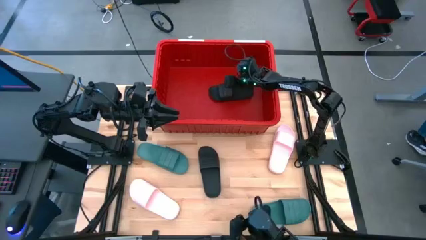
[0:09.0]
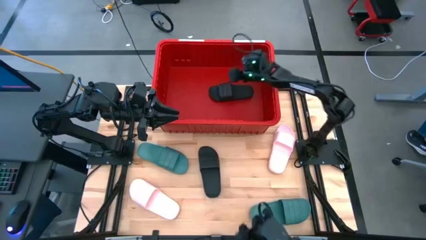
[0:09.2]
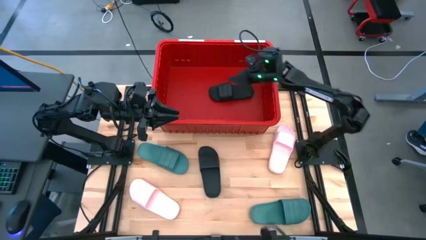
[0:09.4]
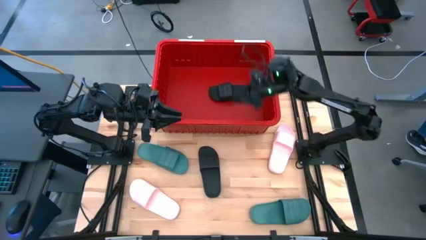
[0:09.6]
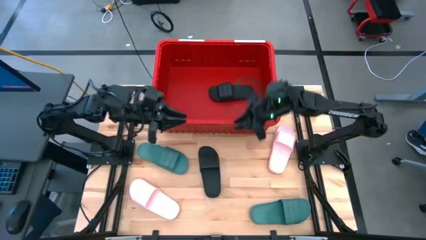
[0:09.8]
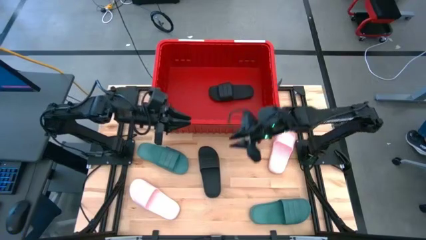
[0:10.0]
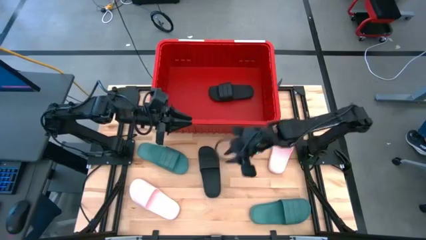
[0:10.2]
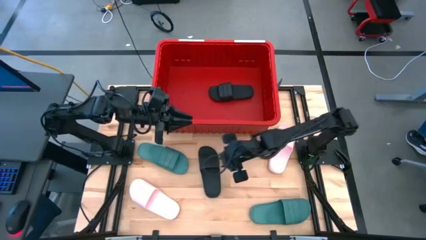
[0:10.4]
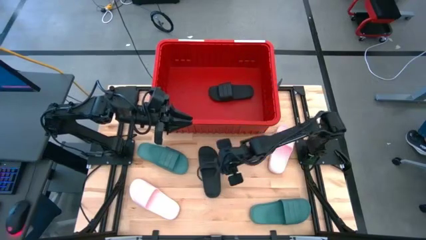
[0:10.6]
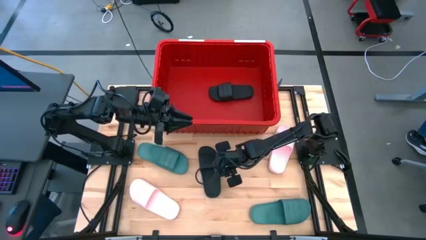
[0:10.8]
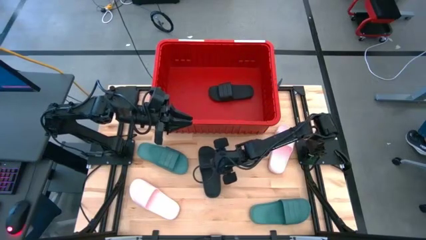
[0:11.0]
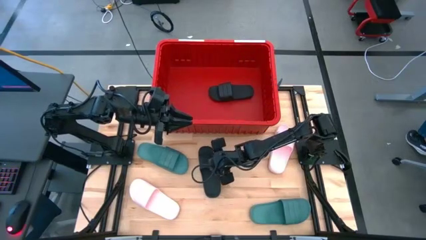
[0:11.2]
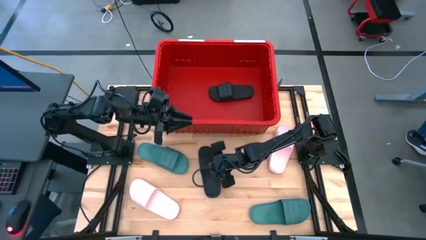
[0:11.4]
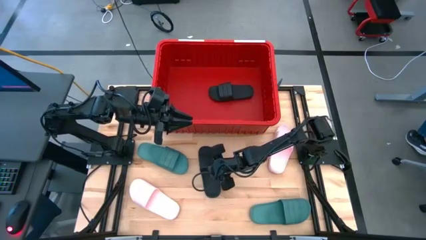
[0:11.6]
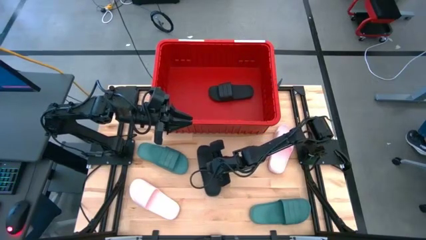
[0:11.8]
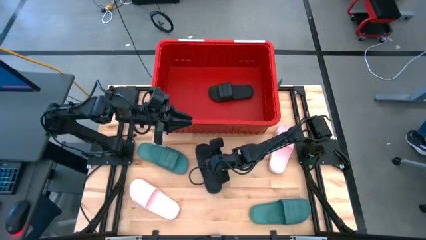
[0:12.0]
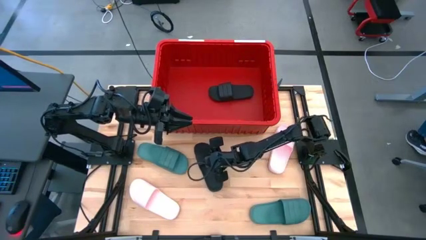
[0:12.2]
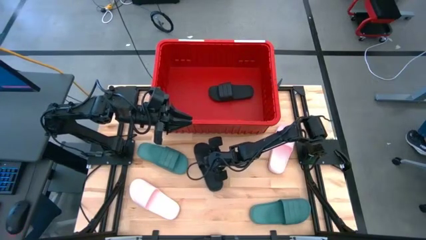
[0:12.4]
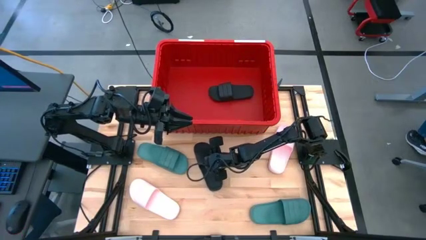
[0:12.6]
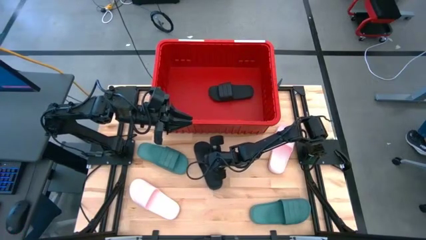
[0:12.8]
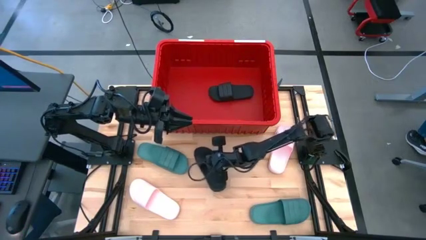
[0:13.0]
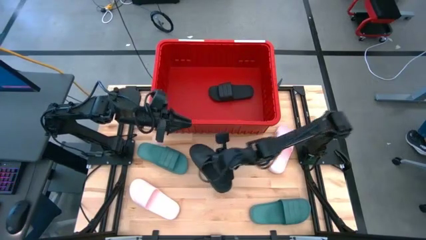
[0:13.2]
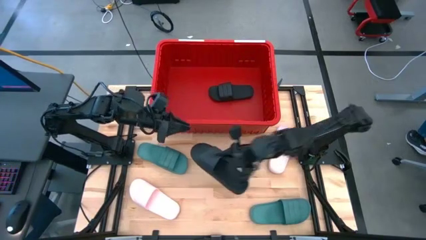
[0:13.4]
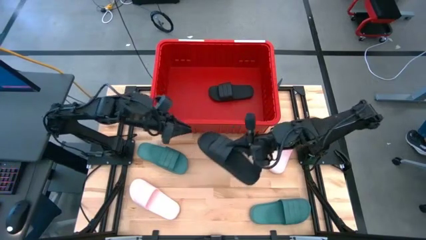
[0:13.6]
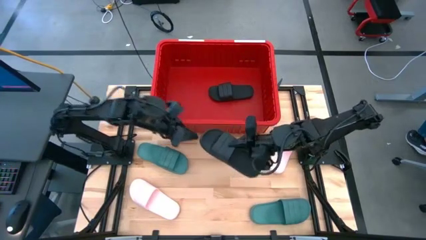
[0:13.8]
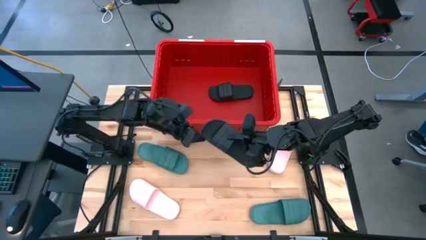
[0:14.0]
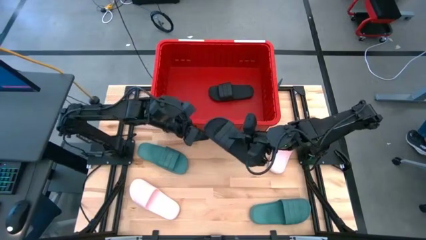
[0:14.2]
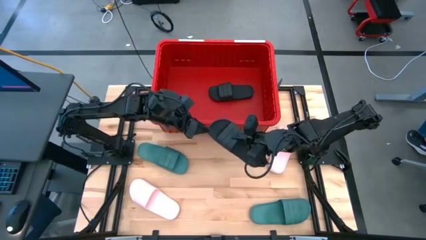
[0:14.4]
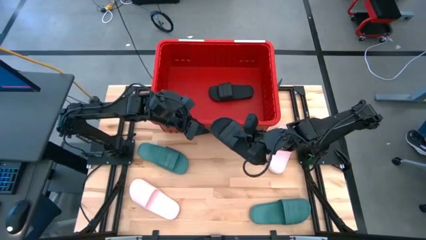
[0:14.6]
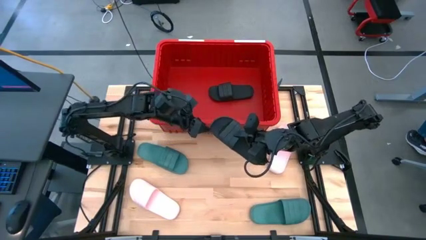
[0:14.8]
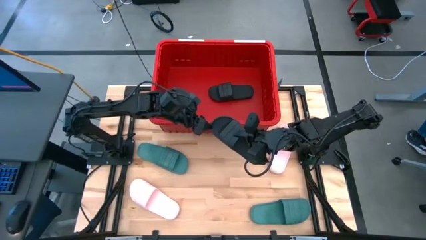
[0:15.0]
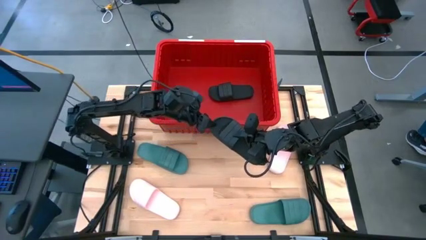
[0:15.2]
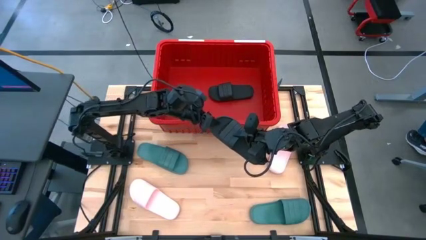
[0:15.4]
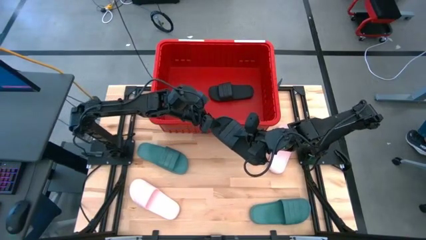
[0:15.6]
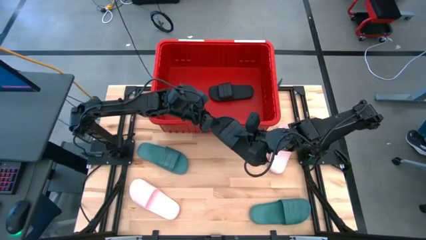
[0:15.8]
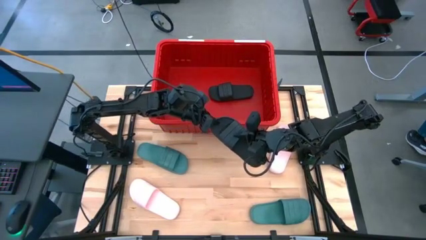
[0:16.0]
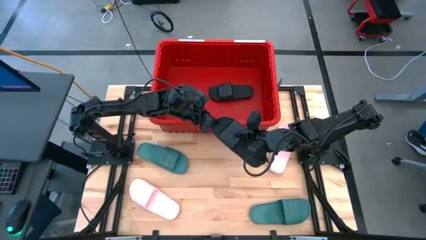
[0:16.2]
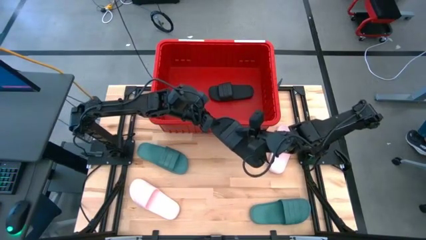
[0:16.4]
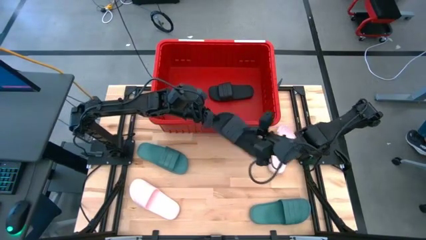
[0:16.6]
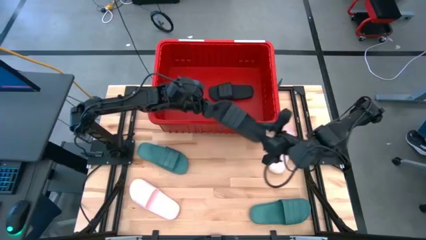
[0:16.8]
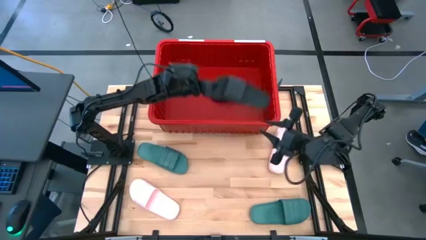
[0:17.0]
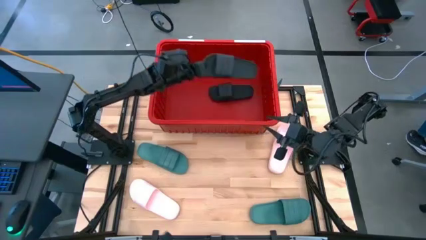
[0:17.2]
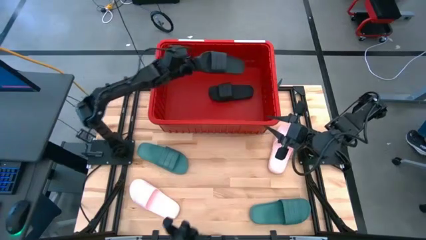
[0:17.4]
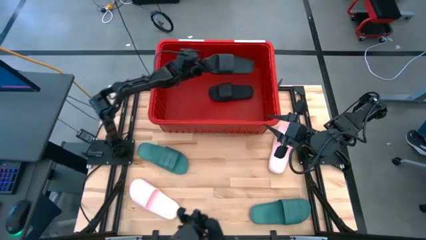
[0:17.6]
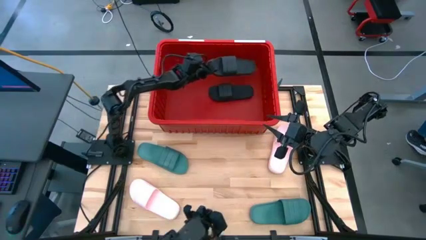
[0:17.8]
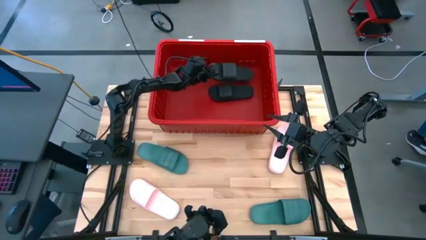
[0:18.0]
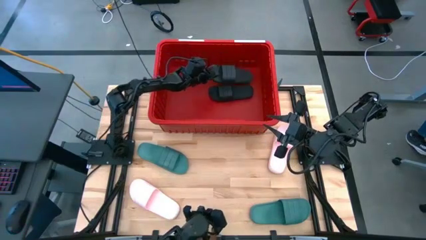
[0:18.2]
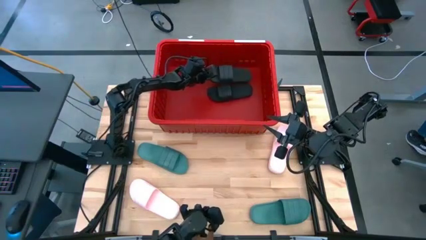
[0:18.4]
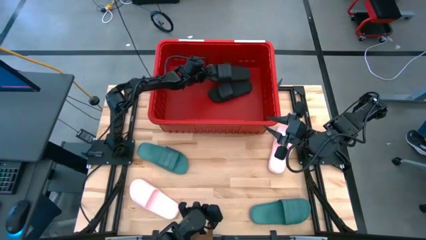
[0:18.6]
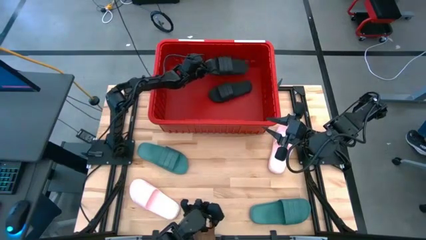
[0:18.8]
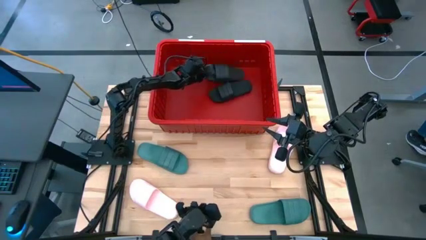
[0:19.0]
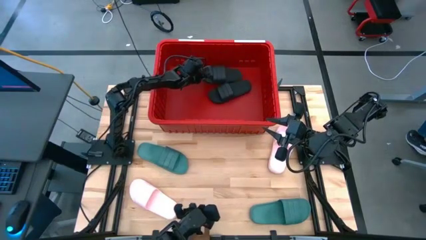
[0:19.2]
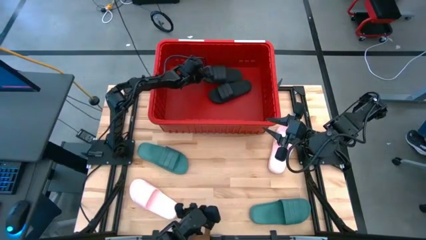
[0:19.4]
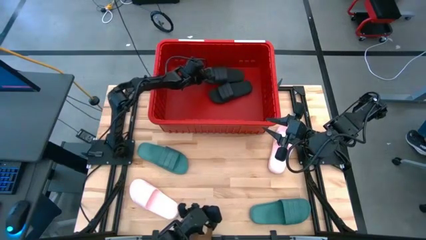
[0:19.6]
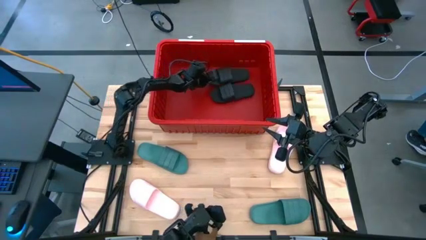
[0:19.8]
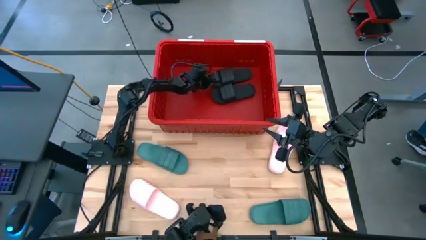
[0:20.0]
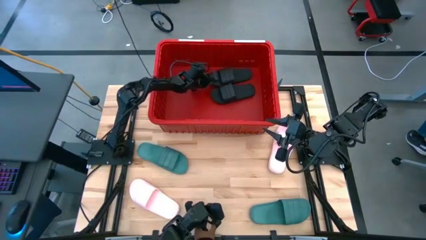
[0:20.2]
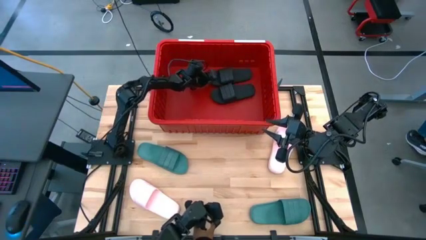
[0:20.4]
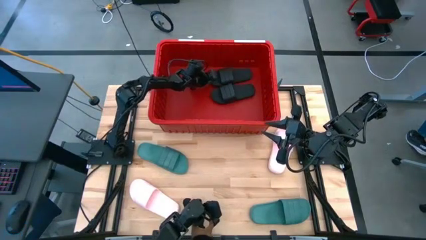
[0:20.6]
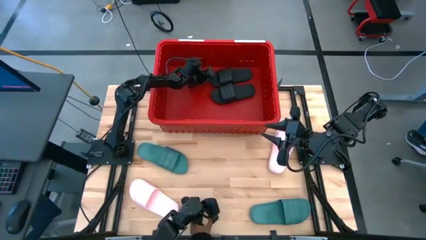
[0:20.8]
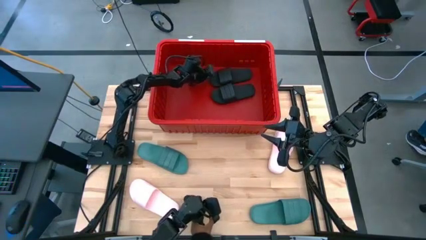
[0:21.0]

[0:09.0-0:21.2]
Task: Pick and place slides into bin
Put the black slide into the red bin

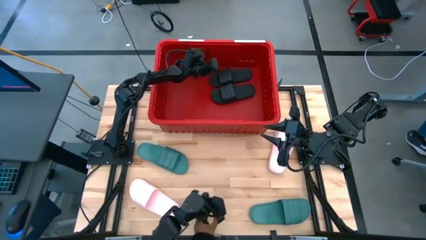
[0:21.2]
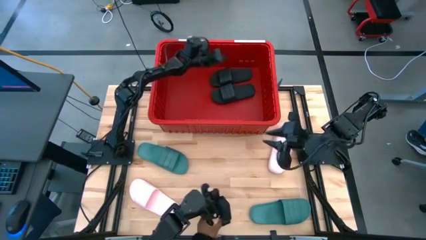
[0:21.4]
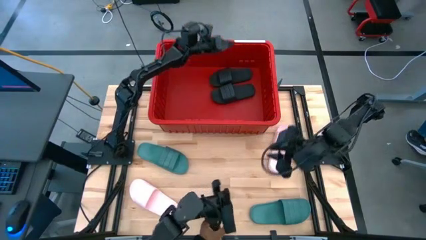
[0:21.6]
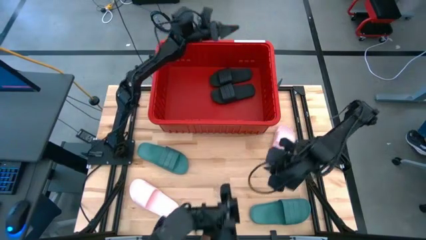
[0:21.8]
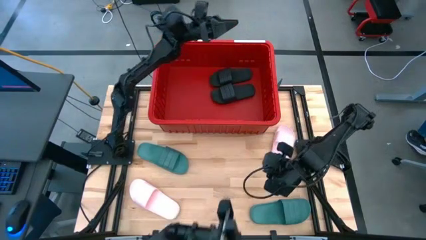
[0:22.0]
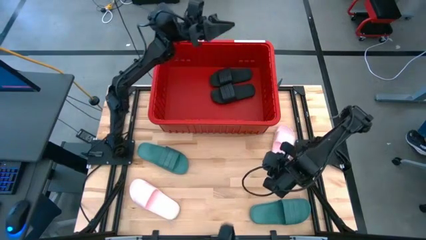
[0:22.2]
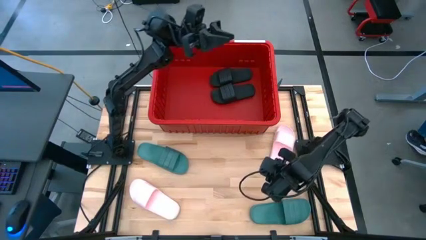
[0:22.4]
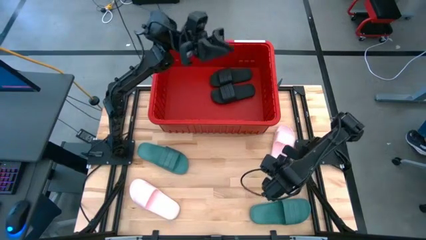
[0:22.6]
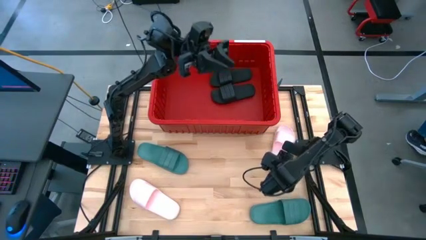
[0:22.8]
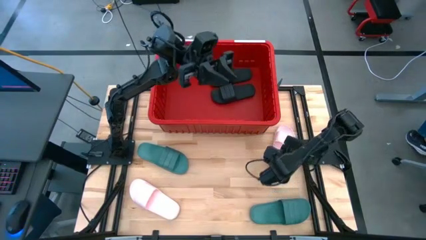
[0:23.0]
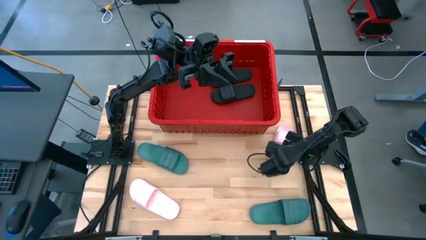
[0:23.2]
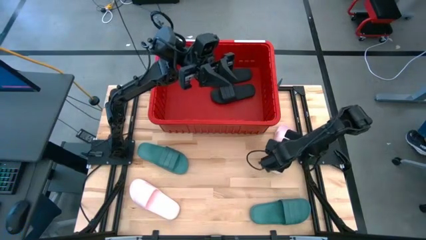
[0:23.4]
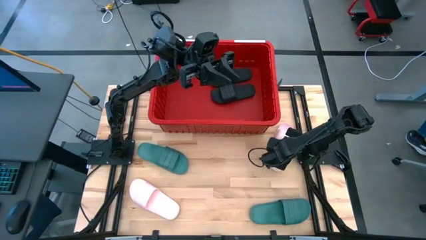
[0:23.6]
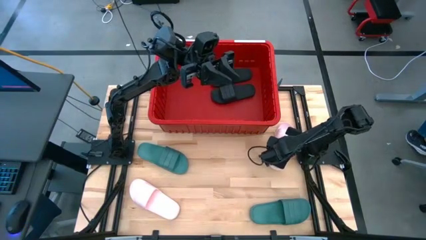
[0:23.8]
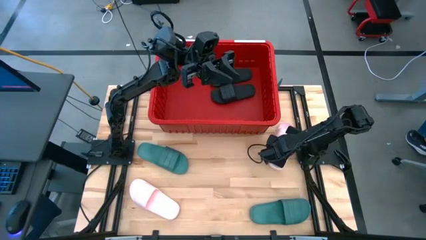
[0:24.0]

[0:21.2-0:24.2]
Put the right pink slide into the red bin
